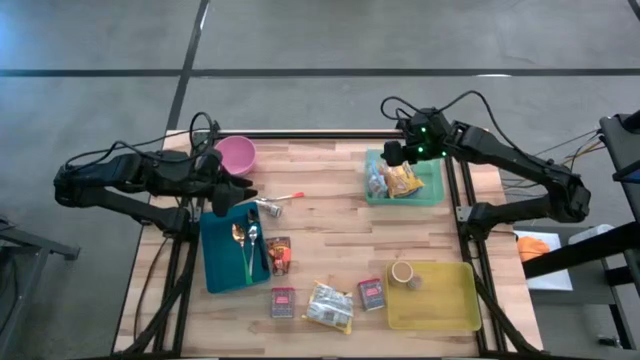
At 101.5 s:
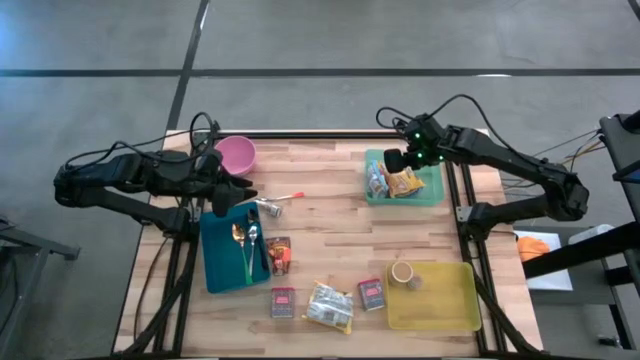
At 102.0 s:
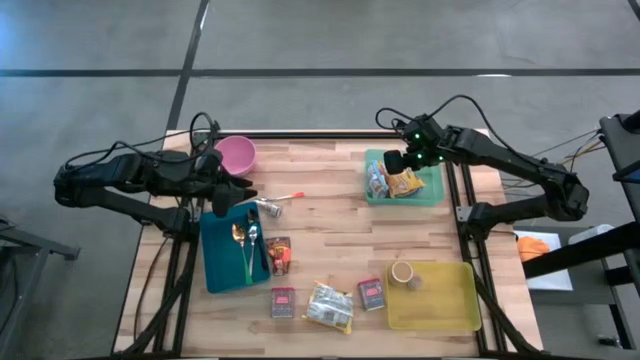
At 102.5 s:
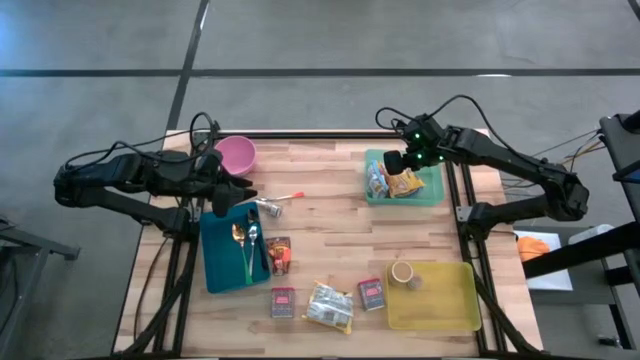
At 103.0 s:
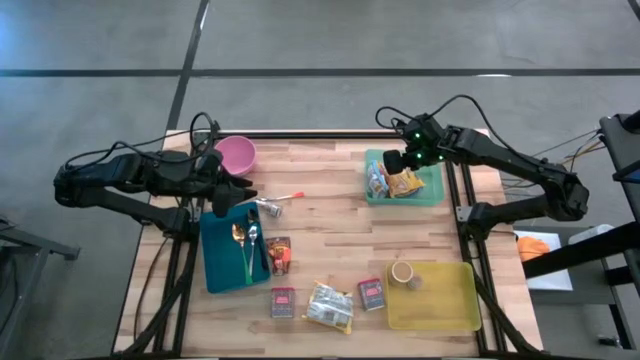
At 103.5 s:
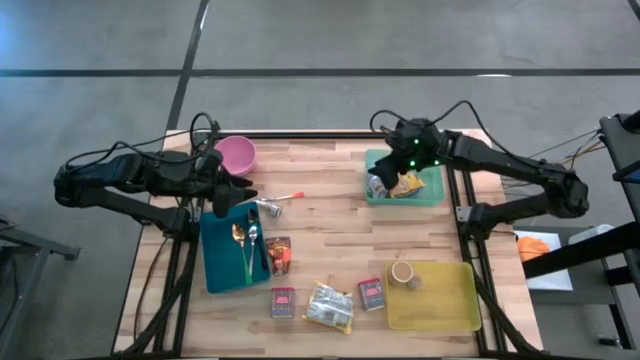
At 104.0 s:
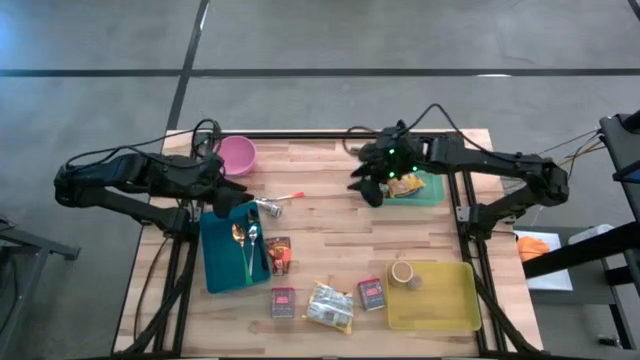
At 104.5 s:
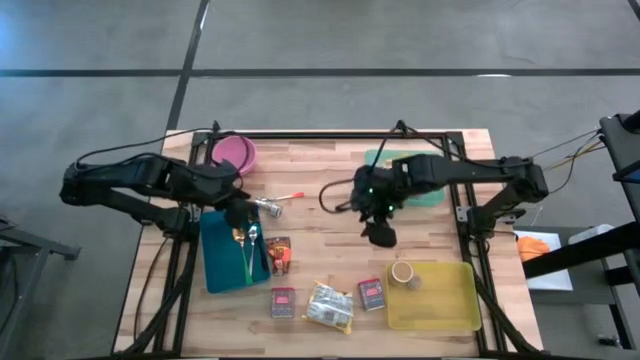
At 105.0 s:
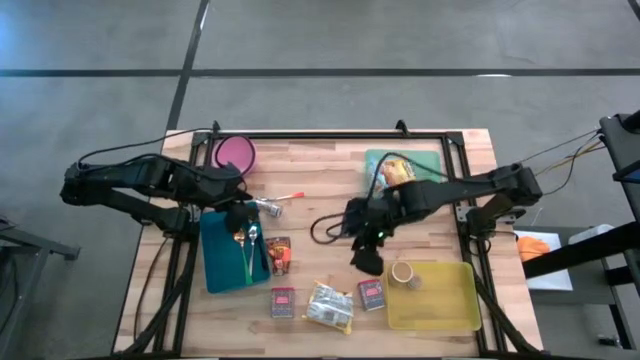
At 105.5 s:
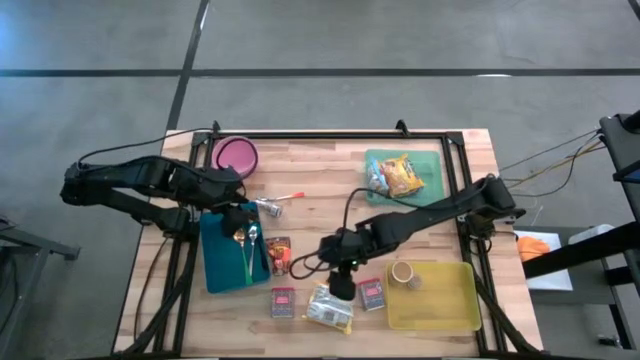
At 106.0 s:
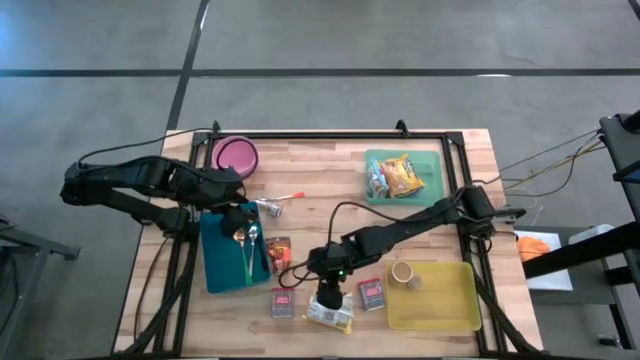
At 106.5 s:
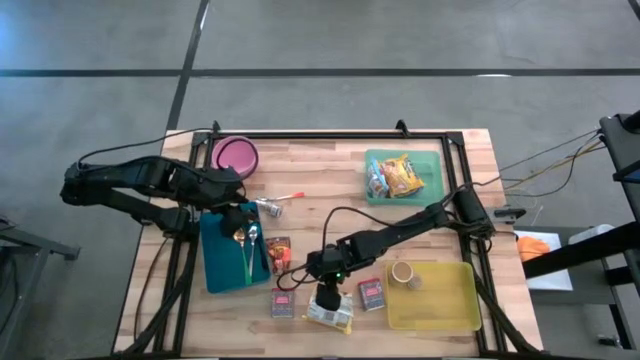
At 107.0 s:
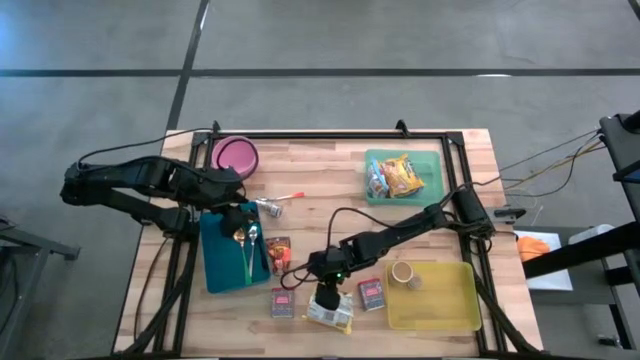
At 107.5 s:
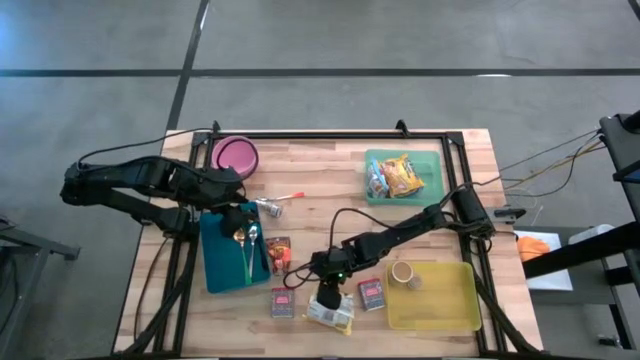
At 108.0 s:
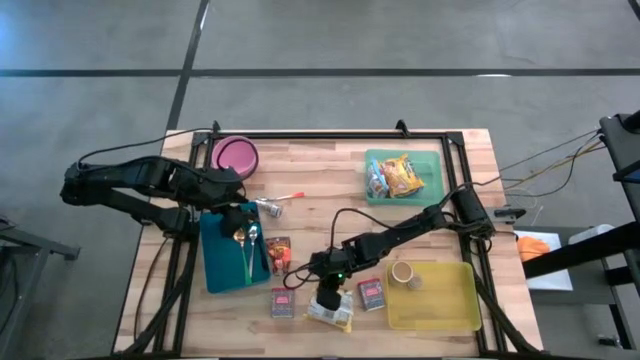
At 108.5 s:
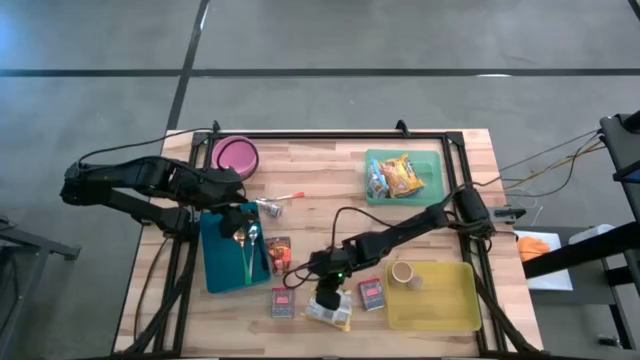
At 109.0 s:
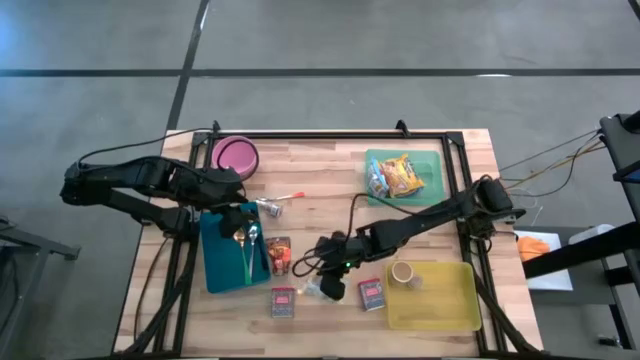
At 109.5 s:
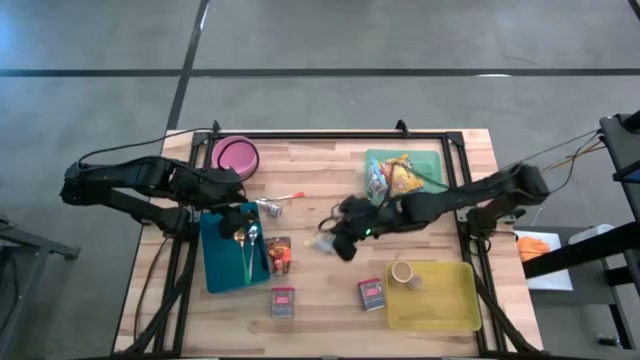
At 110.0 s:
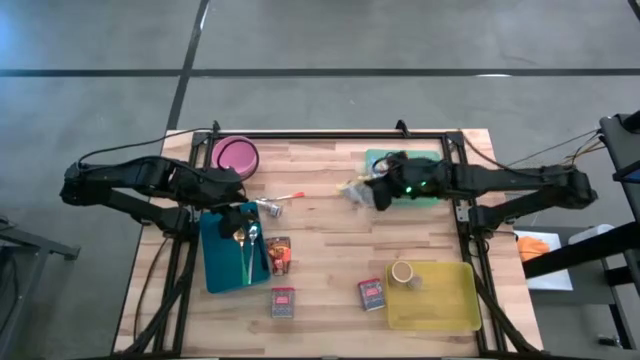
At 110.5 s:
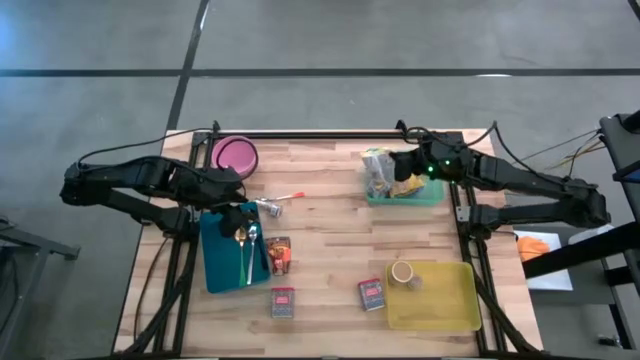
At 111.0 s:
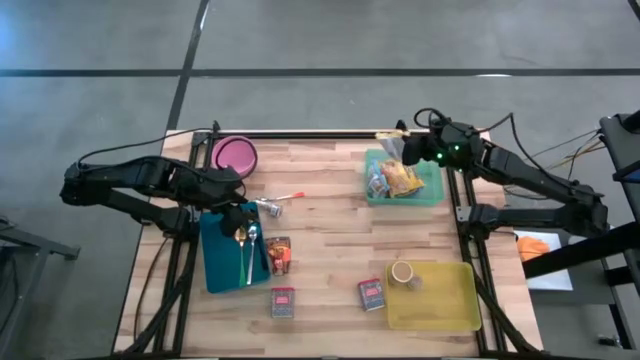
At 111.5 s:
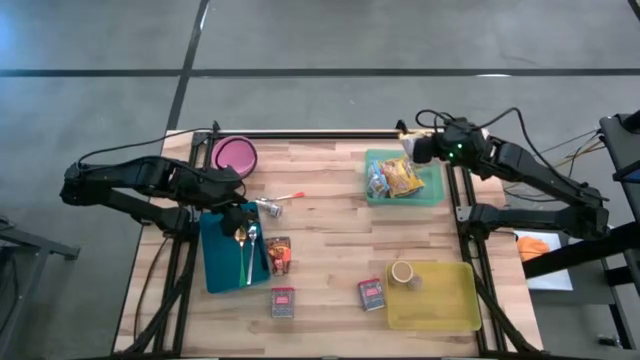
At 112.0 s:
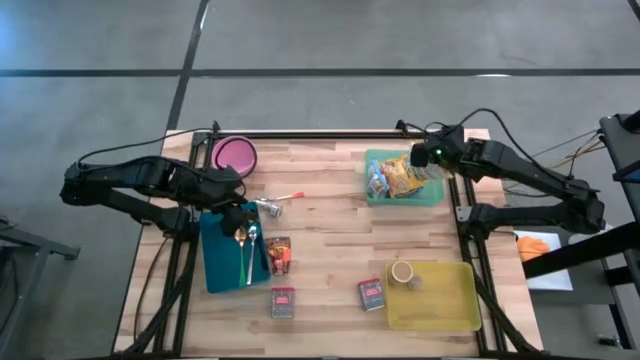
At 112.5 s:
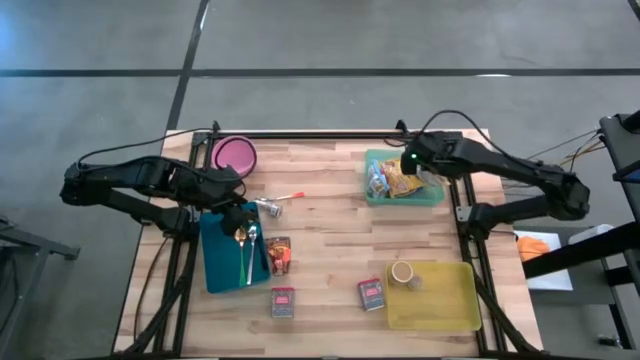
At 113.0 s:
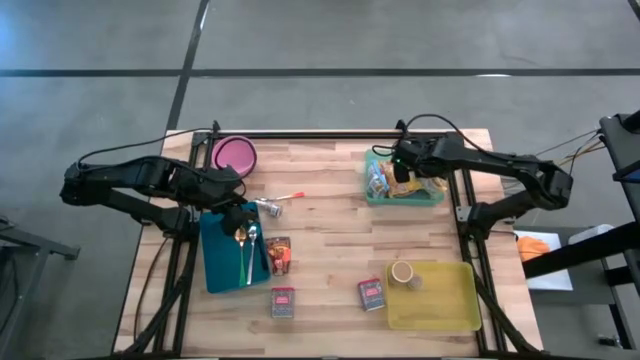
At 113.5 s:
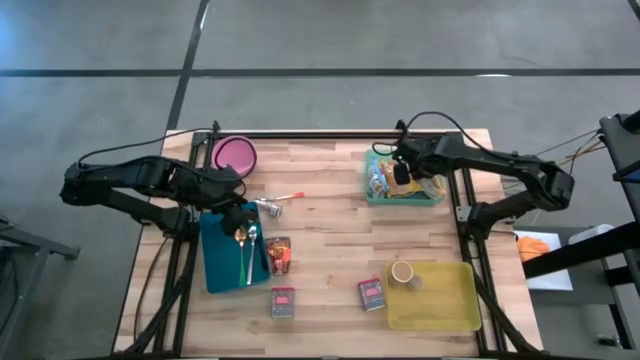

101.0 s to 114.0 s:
Put the yellow noodle pack into the green bin

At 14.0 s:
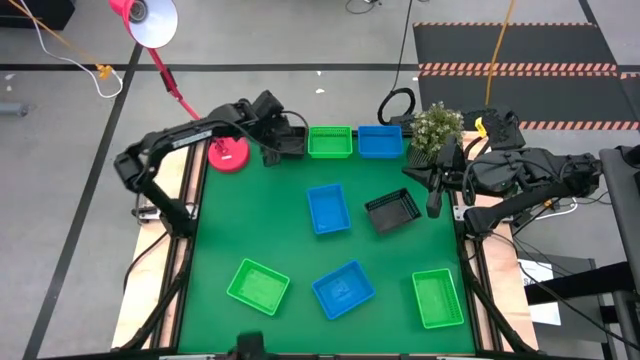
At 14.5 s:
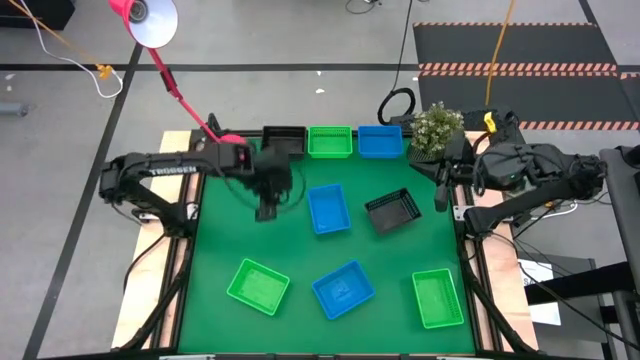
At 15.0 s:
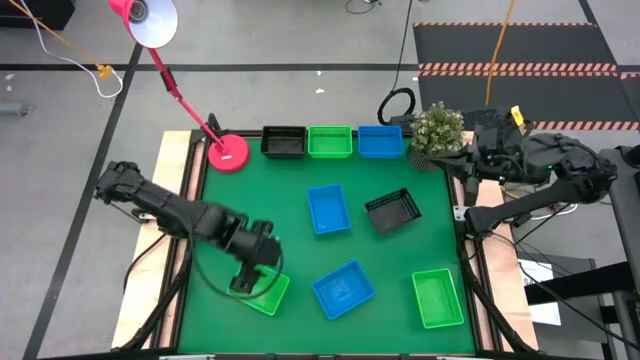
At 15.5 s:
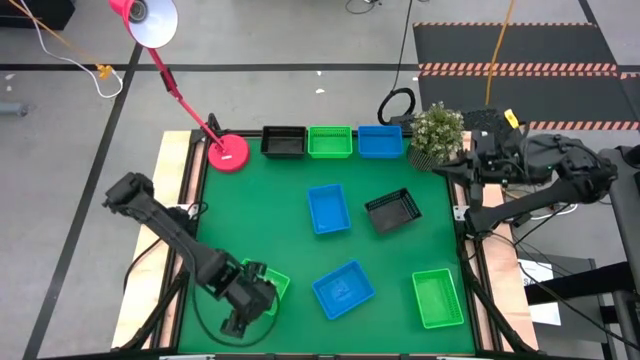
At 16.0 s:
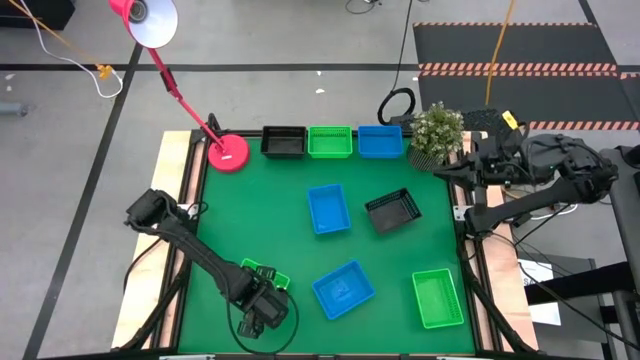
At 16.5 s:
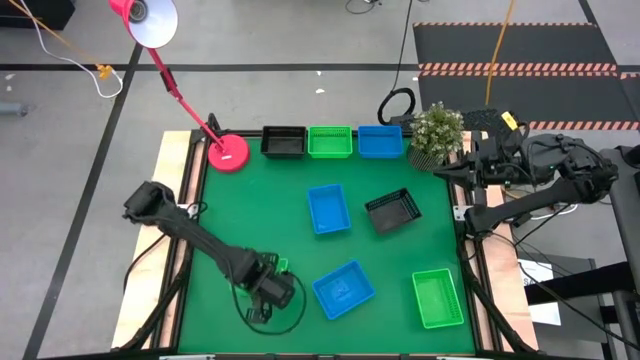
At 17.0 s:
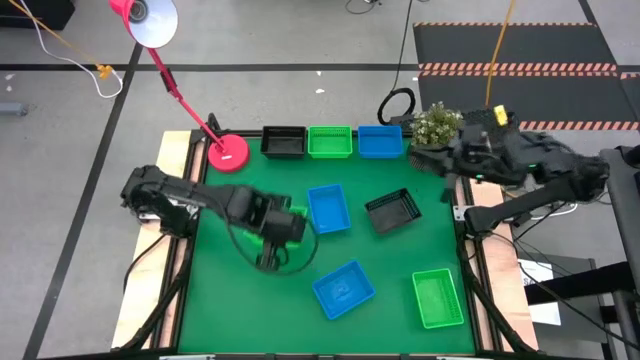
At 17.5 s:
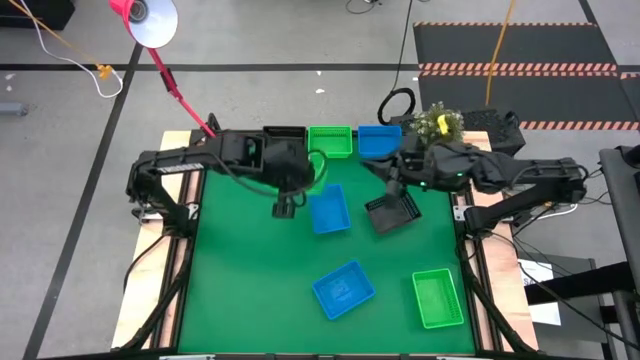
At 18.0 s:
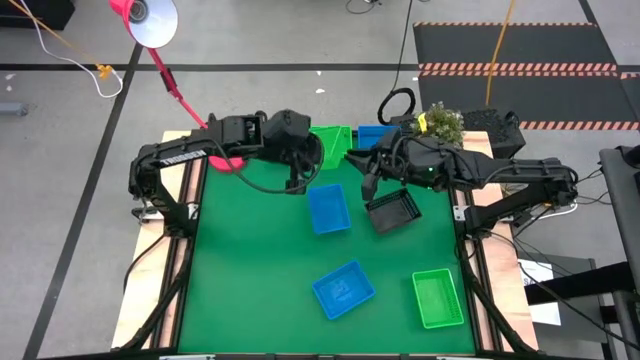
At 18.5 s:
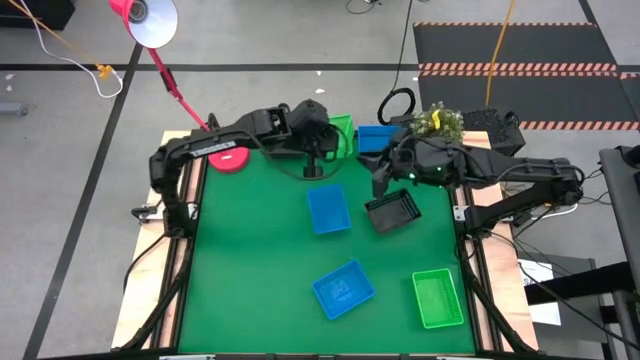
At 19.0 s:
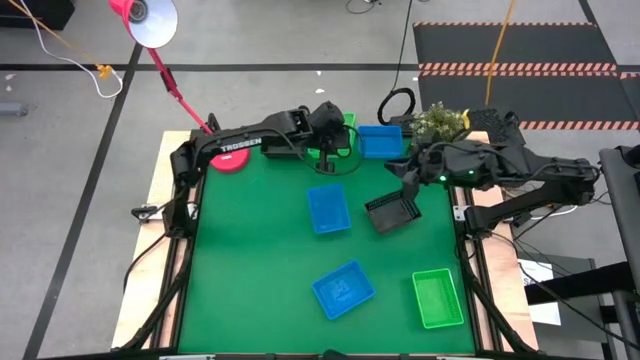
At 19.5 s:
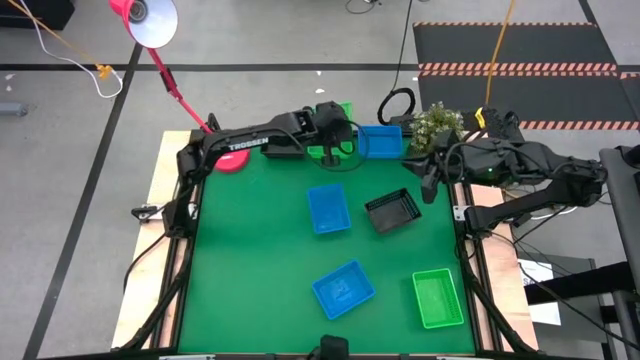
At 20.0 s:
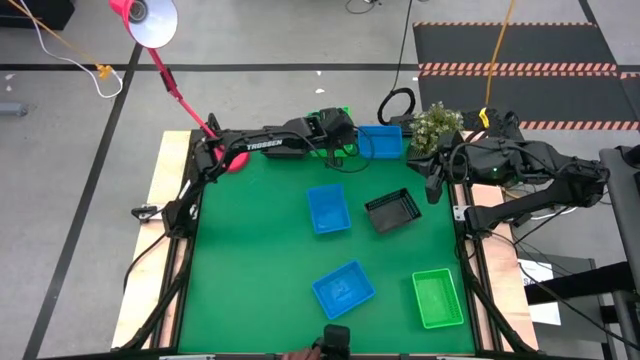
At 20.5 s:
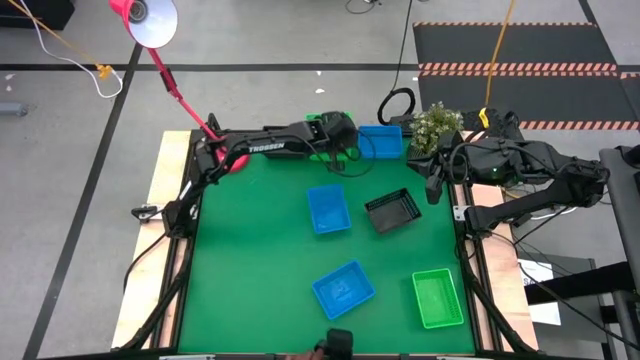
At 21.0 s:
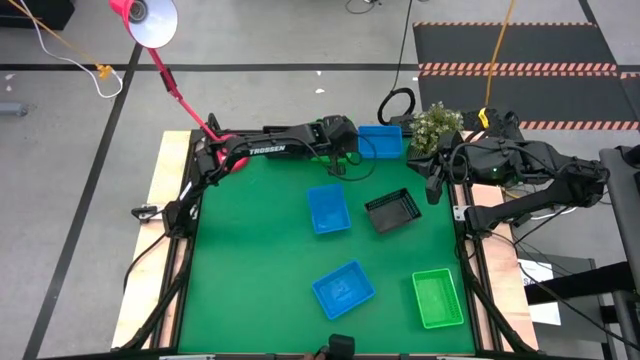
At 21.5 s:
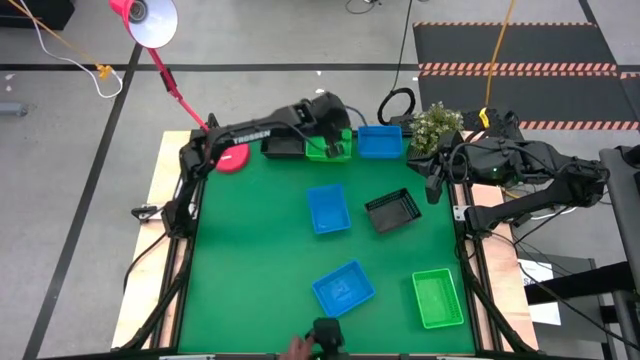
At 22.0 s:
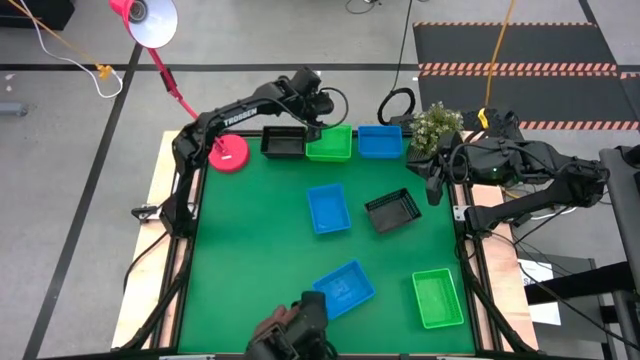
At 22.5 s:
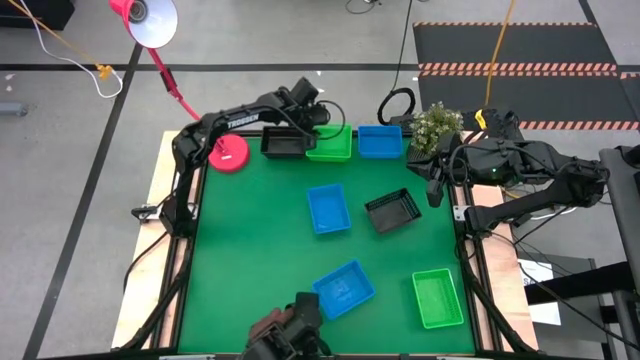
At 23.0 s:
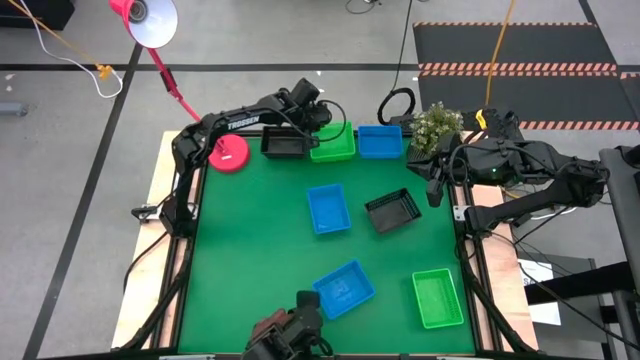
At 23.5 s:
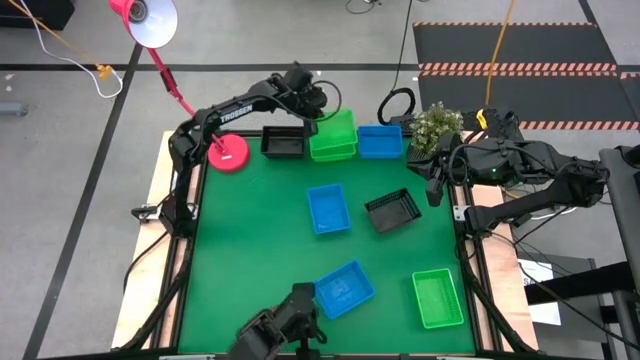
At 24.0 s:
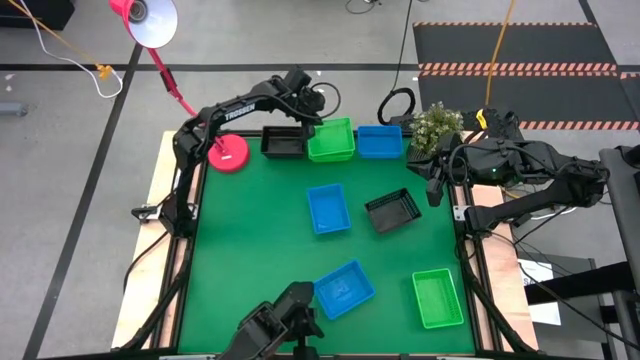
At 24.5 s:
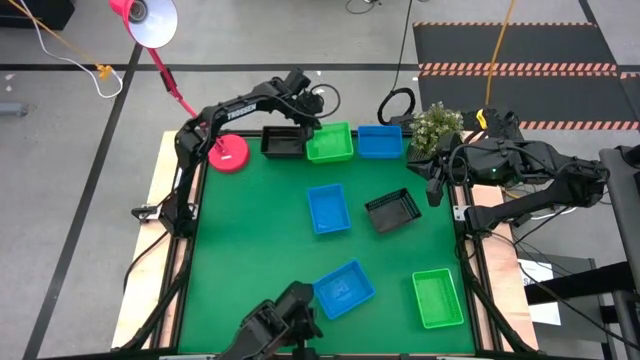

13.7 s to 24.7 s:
Stack the bottom left green bin into the top green bin
